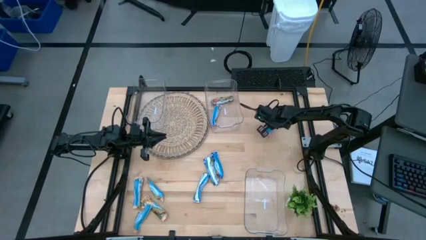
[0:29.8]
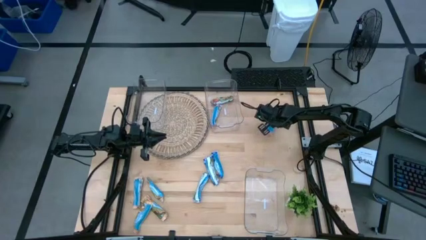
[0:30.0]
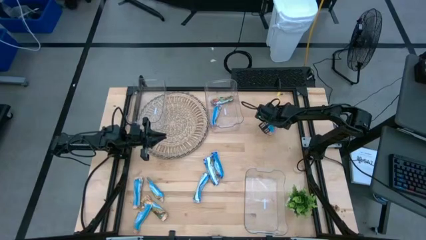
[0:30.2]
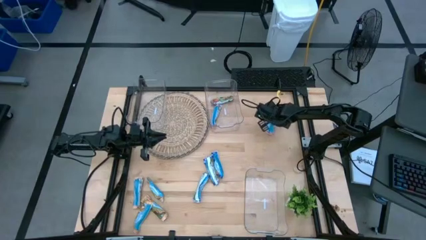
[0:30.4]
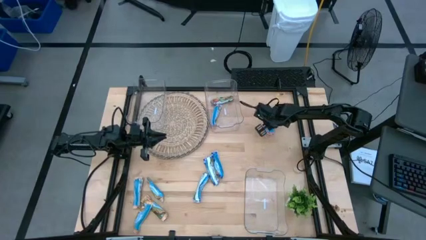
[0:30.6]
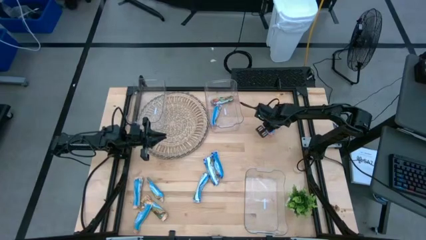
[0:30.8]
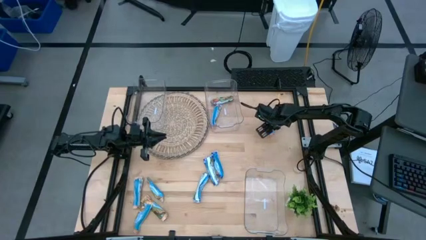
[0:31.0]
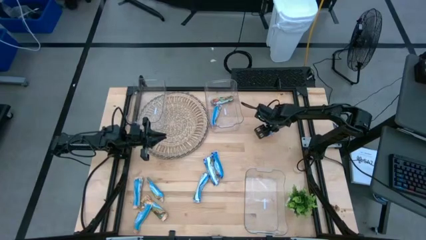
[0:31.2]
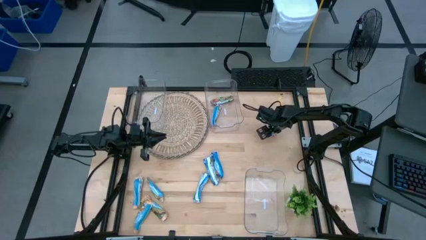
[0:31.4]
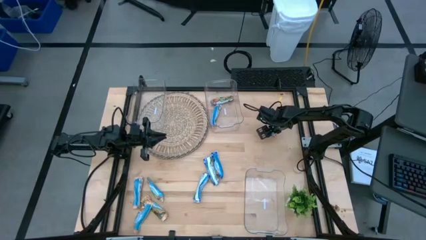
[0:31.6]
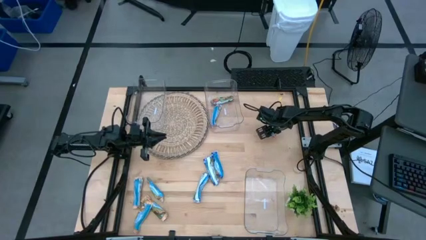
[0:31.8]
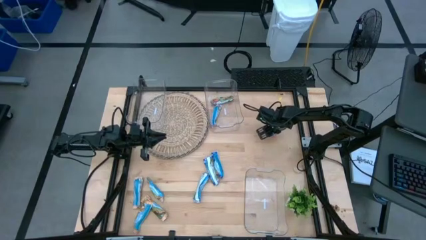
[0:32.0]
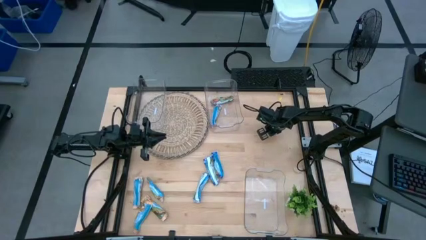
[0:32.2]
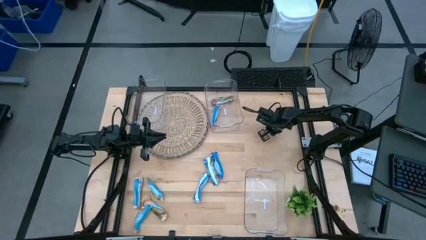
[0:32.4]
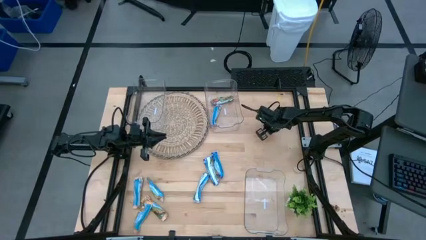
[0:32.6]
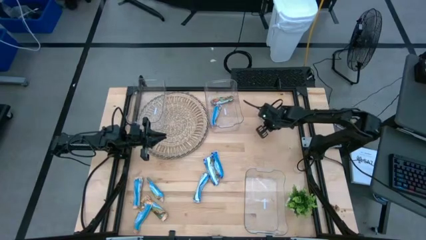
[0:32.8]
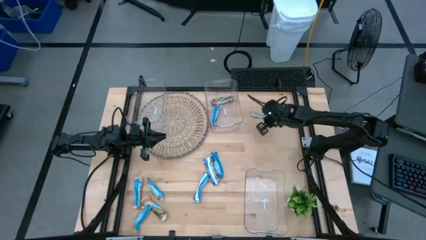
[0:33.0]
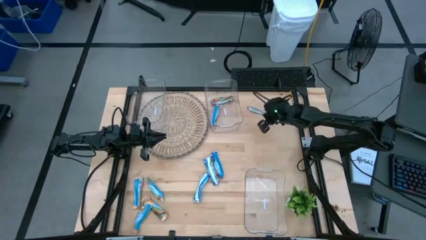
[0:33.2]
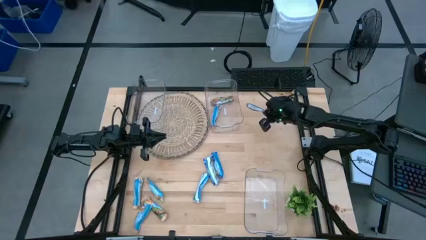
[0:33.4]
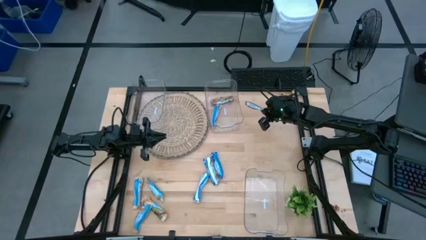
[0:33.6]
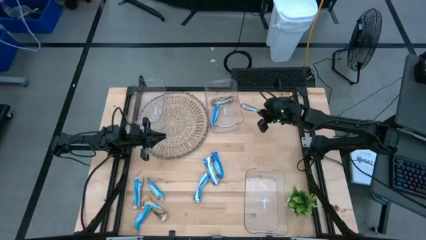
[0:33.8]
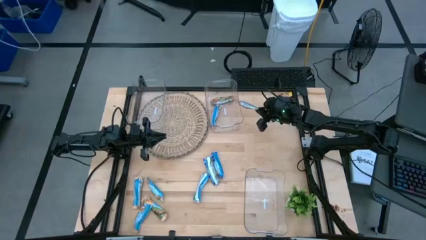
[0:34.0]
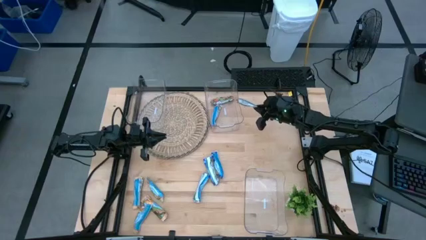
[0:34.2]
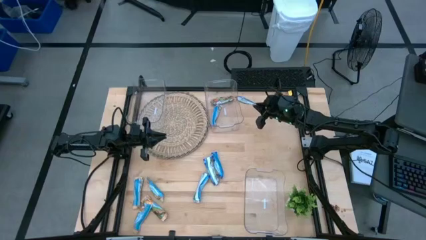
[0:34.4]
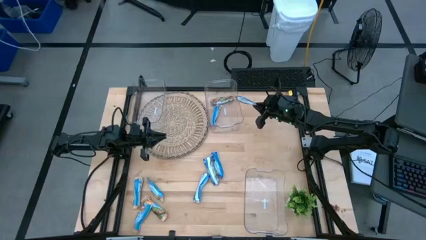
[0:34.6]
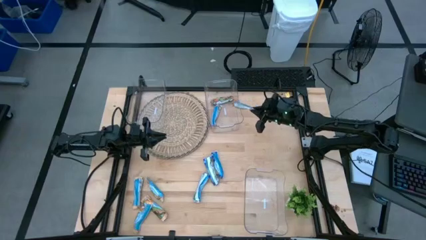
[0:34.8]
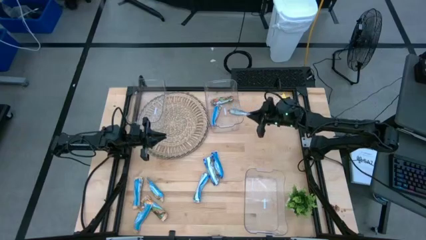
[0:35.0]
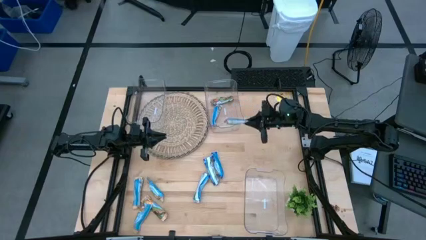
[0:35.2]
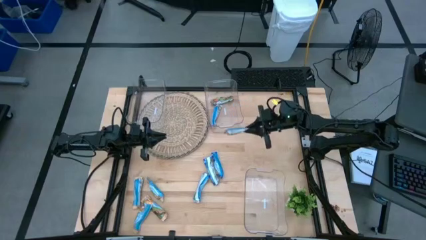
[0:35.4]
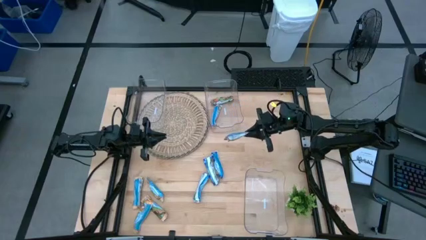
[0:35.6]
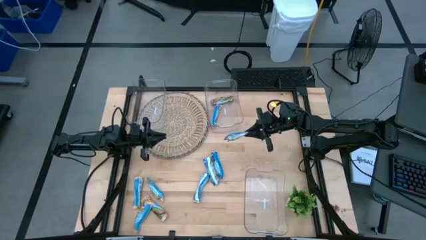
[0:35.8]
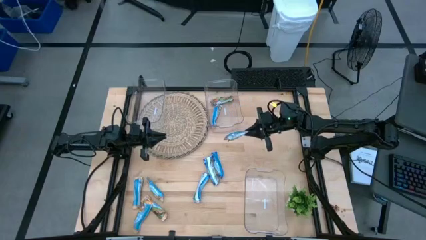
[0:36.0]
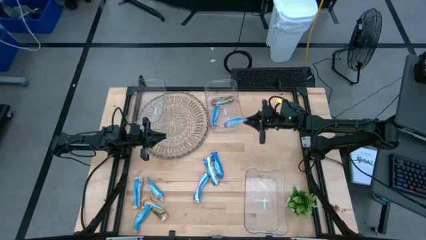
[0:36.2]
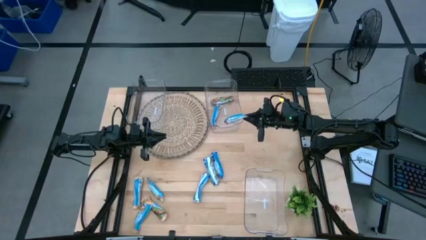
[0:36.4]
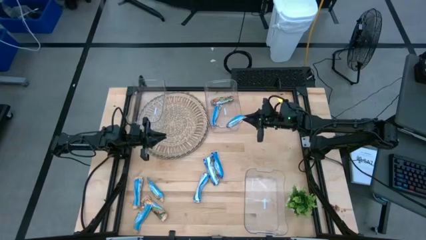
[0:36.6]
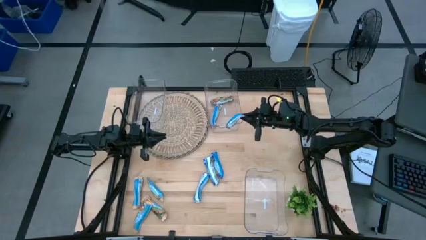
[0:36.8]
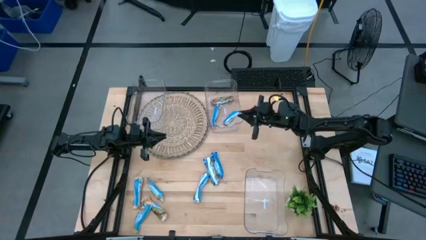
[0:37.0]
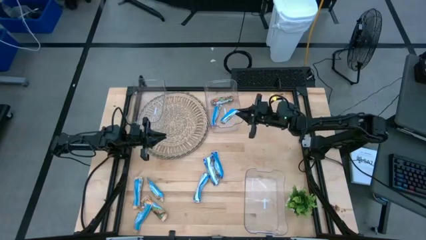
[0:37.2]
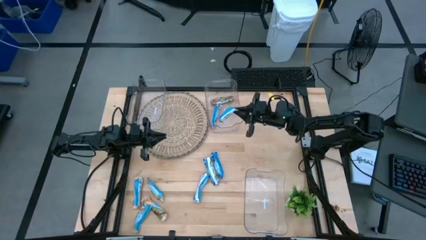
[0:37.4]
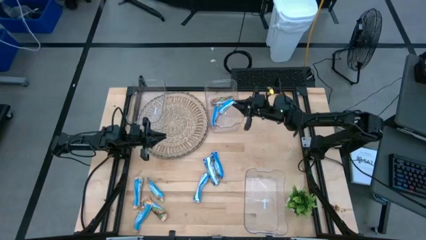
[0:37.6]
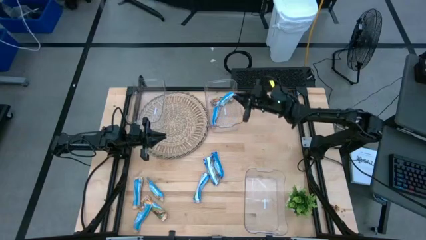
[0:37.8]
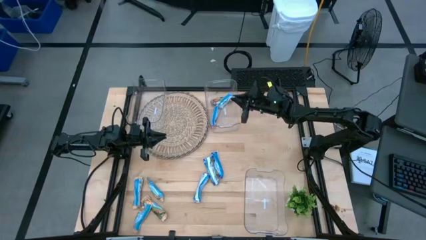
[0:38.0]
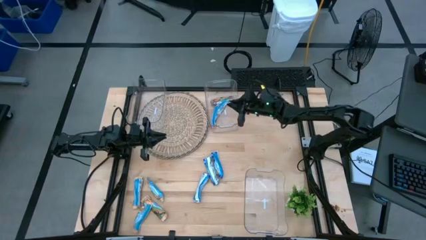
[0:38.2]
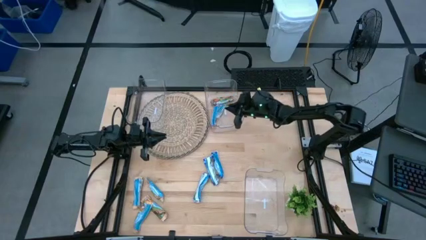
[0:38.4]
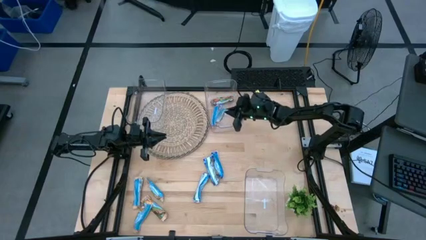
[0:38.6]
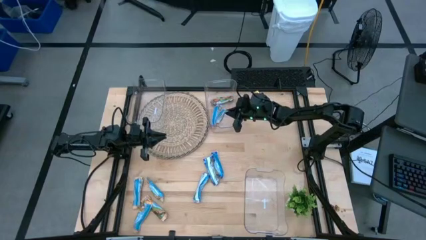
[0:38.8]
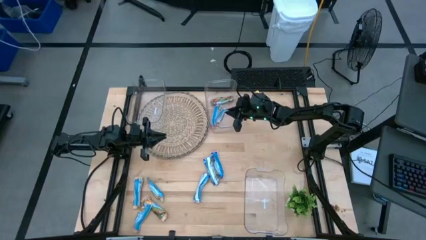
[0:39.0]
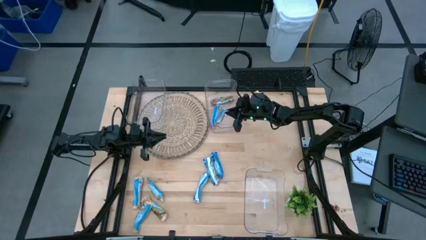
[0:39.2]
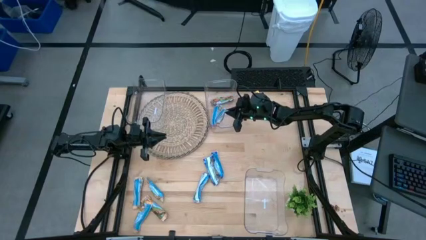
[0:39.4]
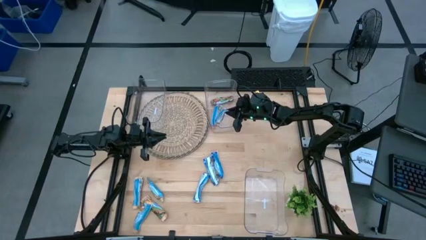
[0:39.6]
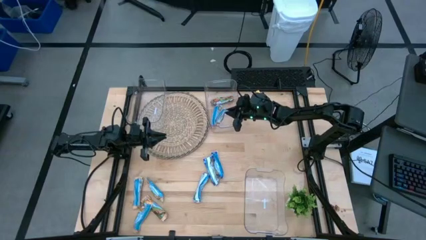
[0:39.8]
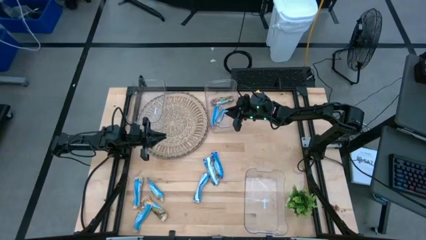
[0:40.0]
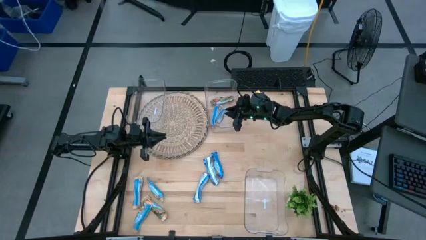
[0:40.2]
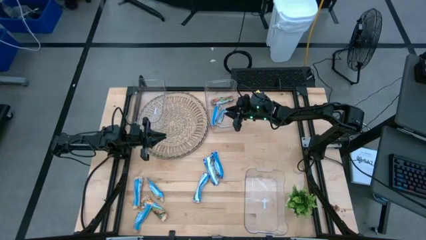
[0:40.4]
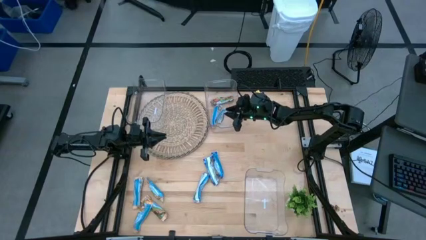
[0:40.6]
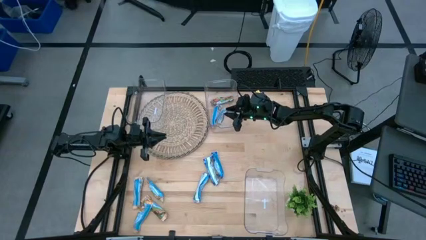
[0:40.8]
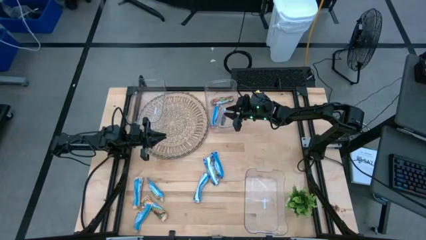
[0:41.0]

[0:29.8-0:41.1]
Task: Pick and place Granola Bars by type
Put the red granola bar into the top right transparent bin

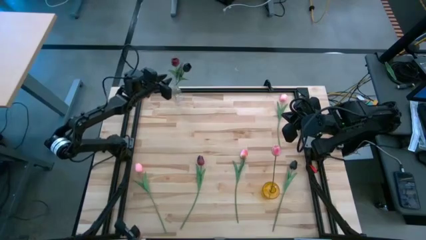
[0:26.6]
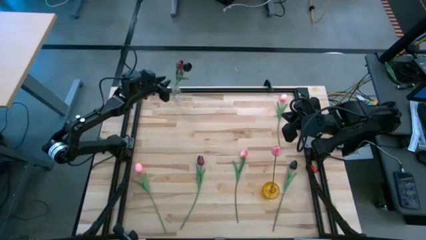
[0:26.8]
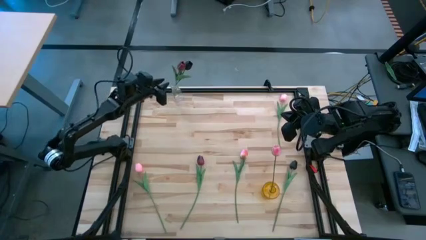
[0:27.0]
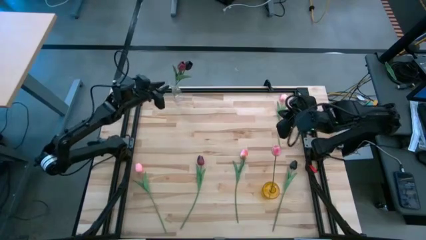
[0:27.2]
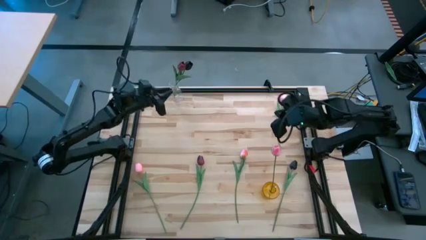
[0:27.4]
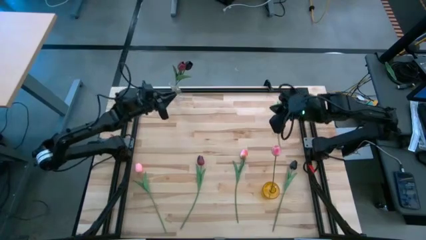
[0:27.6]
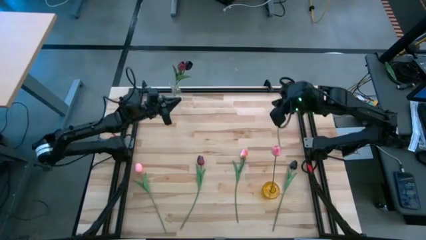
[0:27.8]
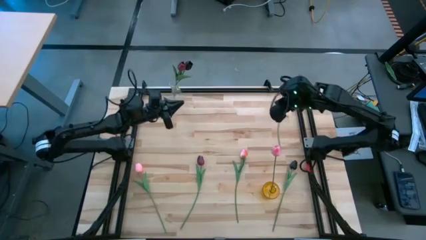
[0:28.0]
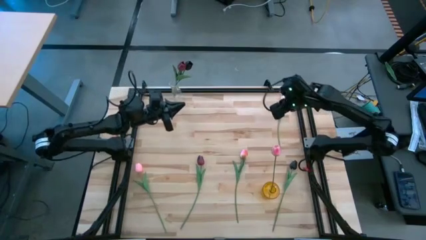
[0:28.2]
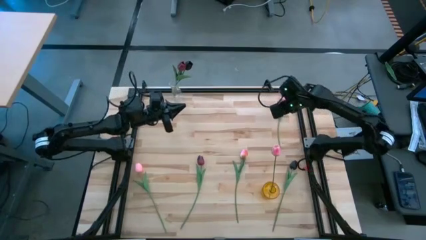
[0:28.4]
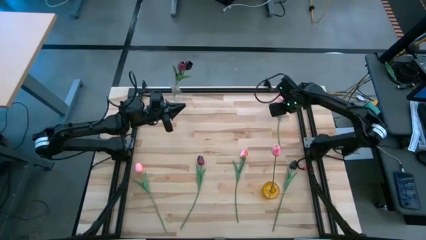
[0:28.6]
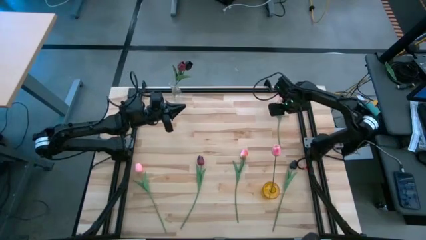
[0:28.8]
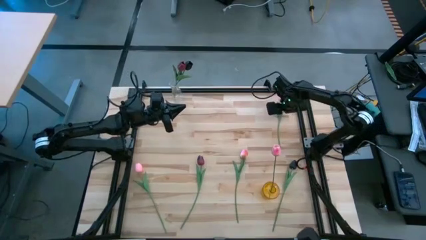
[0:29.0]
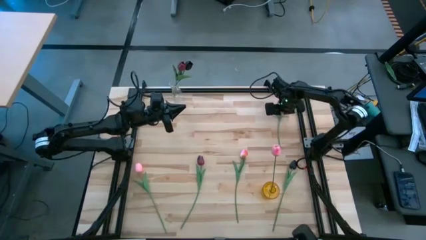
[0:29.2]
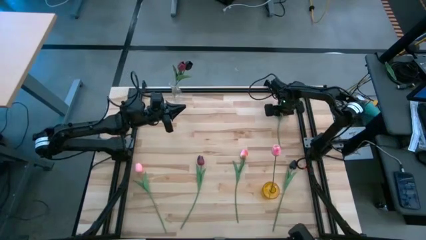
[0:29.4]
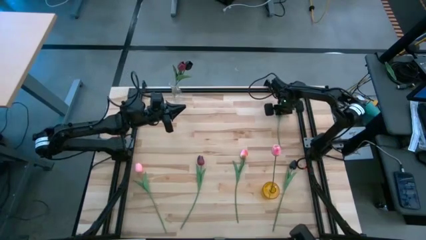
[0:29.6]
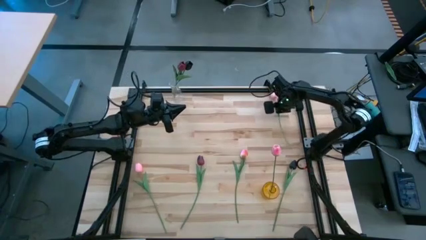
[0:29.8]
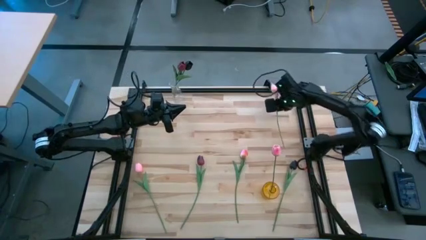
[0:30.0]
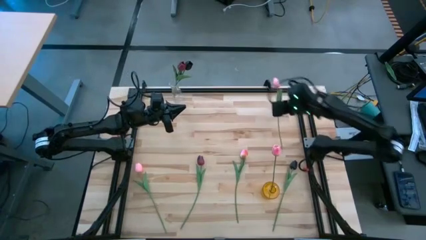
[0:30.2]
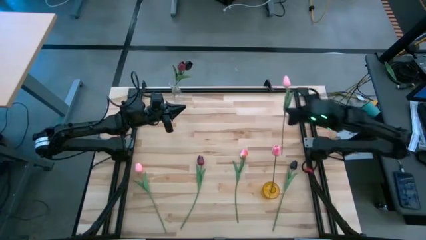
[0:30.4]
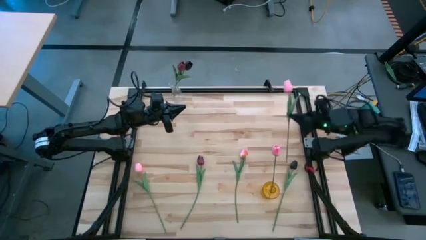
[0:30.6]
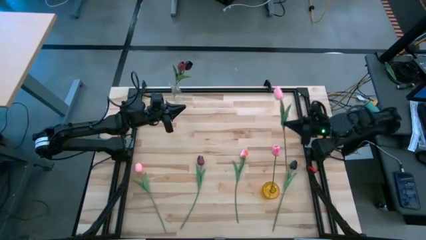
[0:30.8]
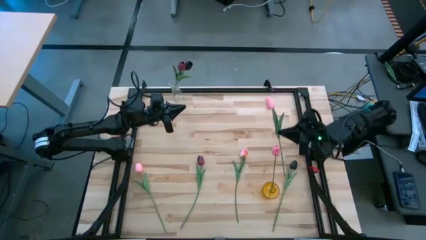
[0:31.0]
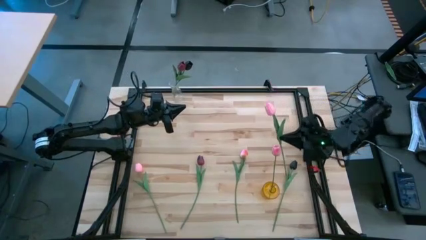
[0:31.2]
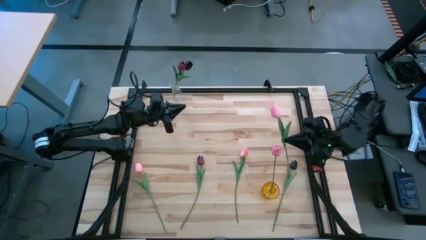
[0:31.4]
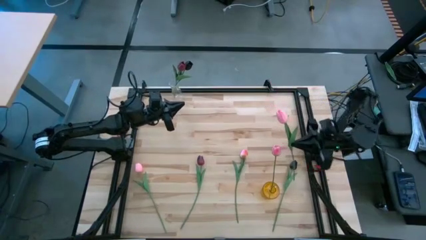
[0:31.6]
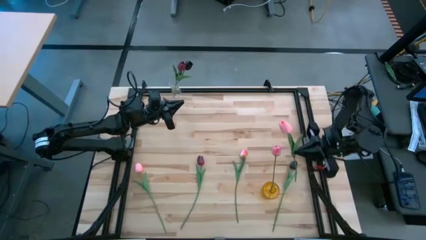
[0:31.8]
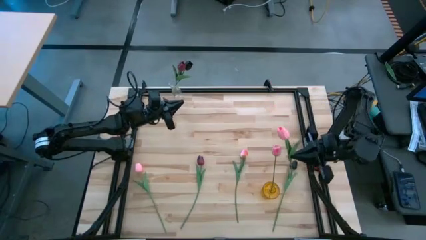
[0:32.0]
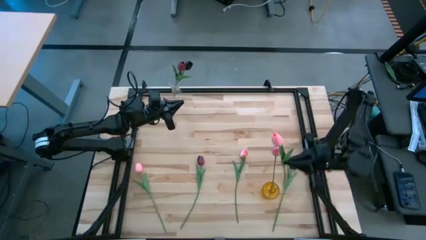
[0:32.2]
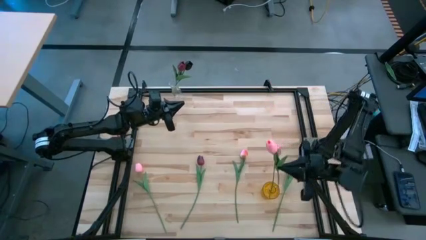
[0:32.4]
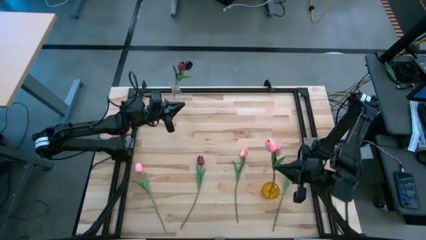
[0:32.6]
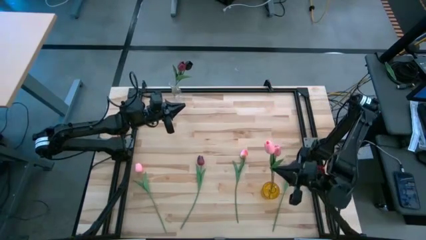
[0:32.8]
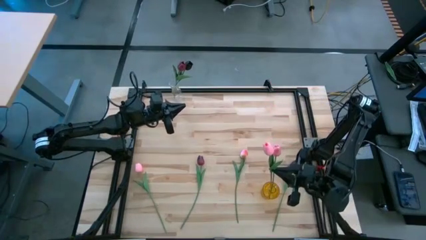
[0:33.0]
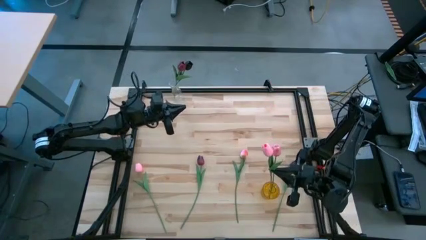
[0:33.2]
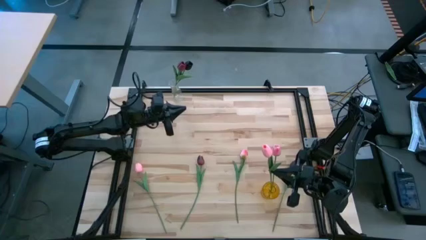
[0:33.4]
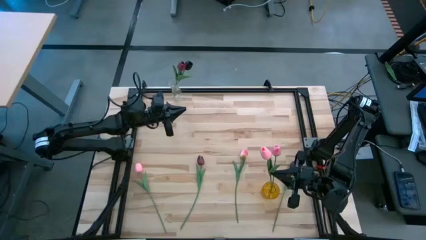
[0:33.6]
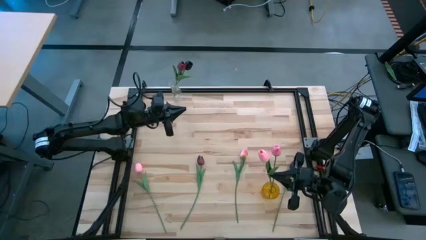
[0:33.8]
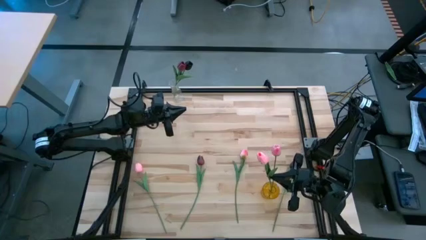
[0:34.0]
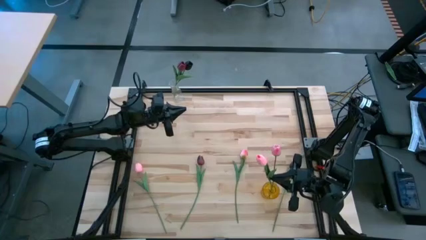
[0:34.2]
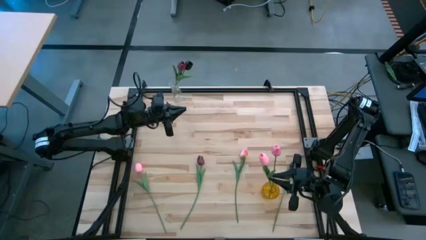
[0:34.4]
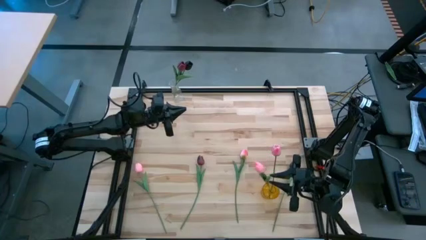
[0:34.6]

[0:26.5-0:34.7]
Task: Sort flowers into vase by color
Put the top pink flower into the yellow flower vase
